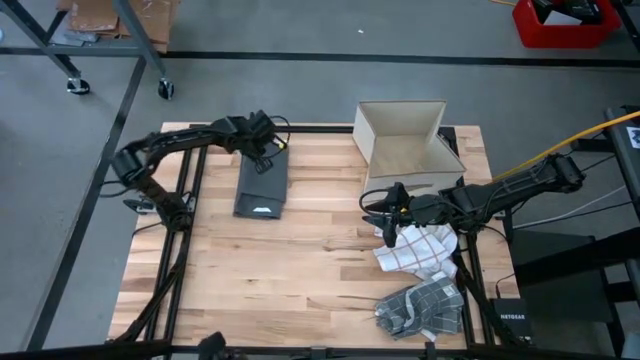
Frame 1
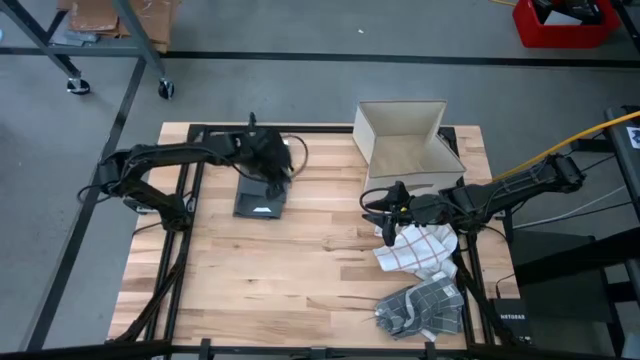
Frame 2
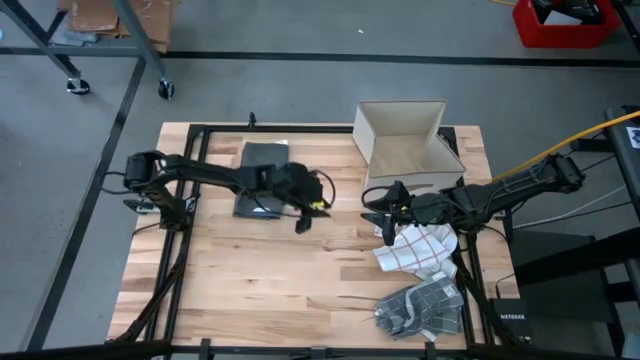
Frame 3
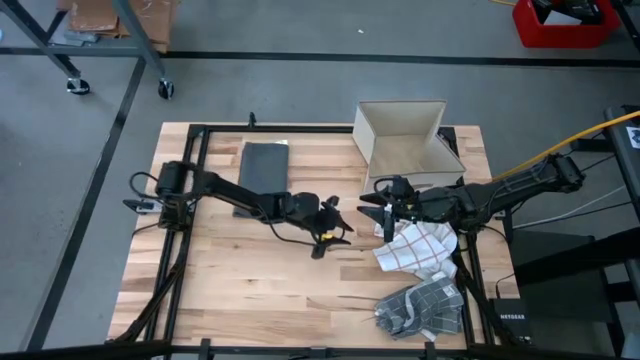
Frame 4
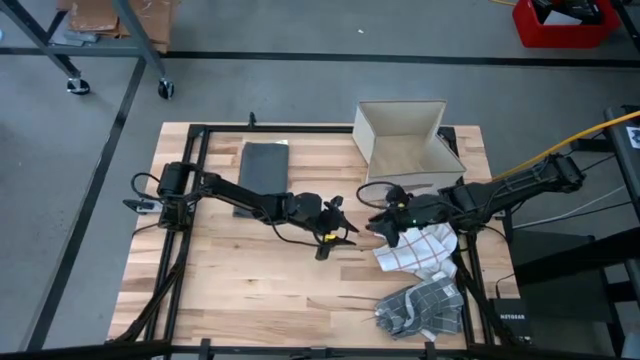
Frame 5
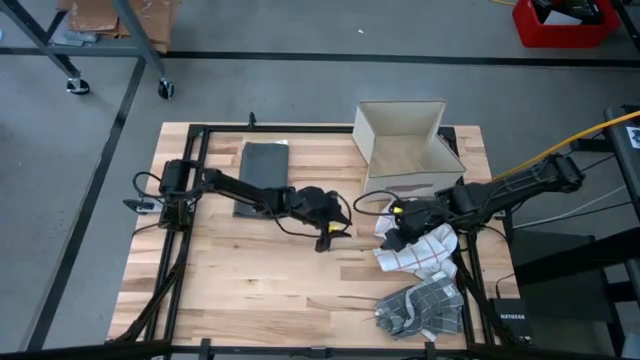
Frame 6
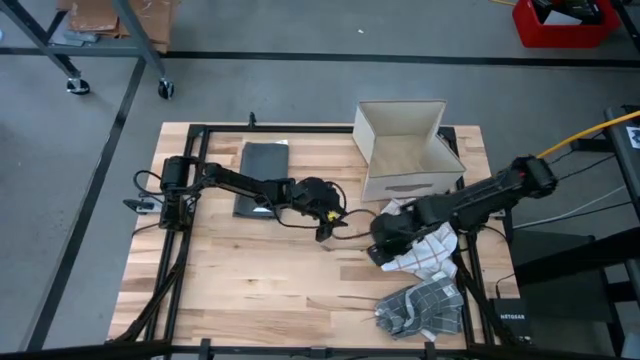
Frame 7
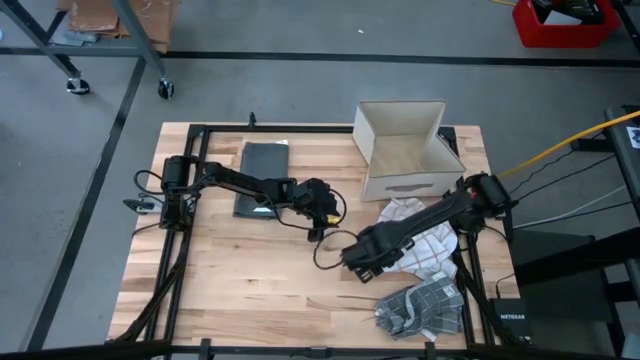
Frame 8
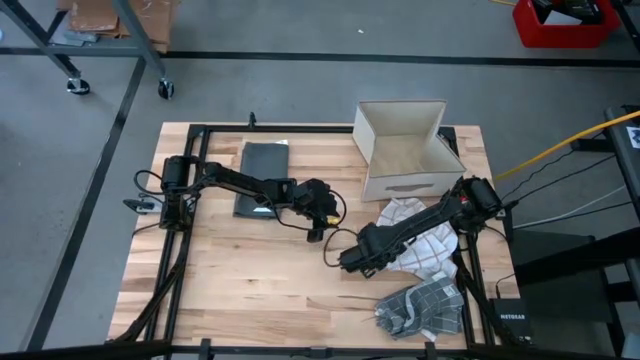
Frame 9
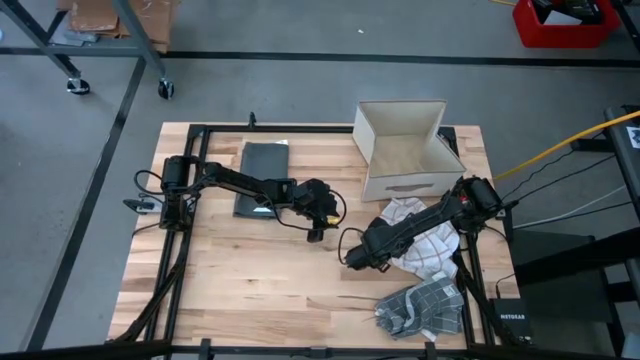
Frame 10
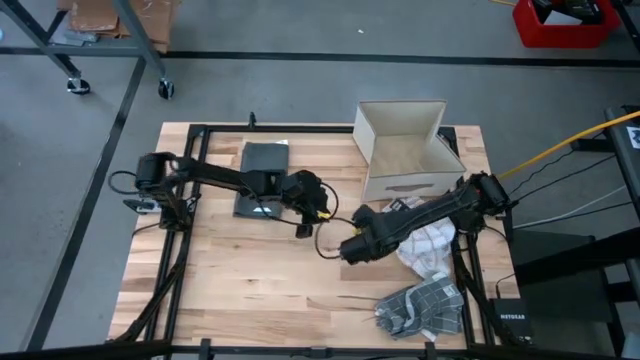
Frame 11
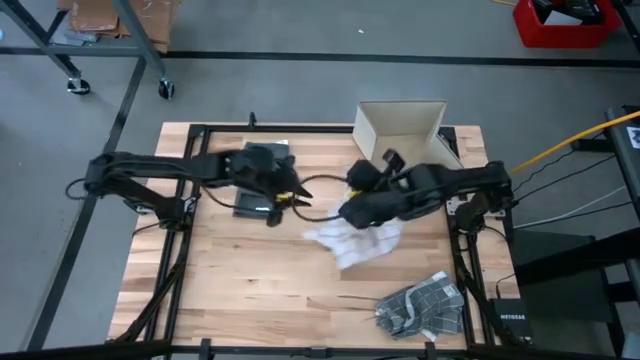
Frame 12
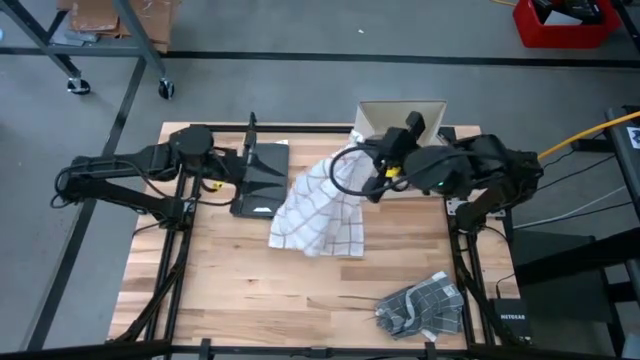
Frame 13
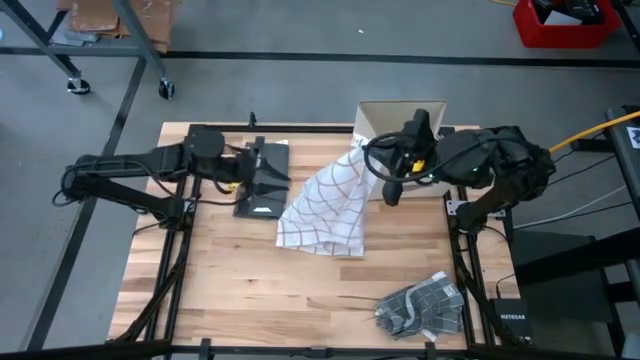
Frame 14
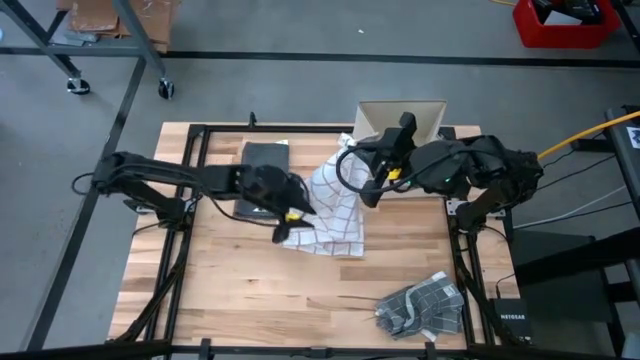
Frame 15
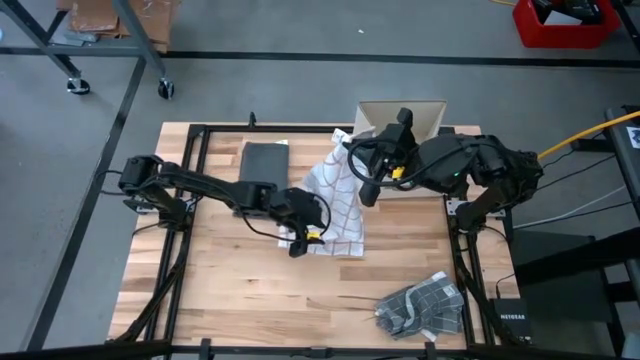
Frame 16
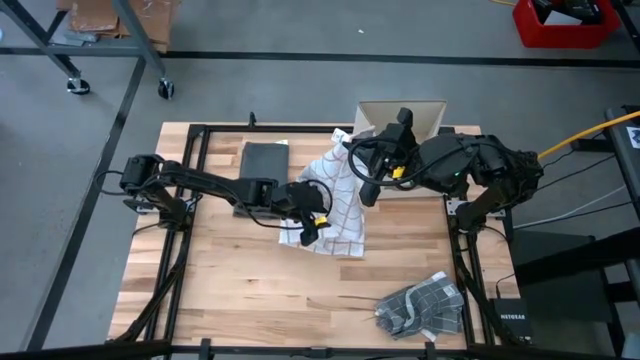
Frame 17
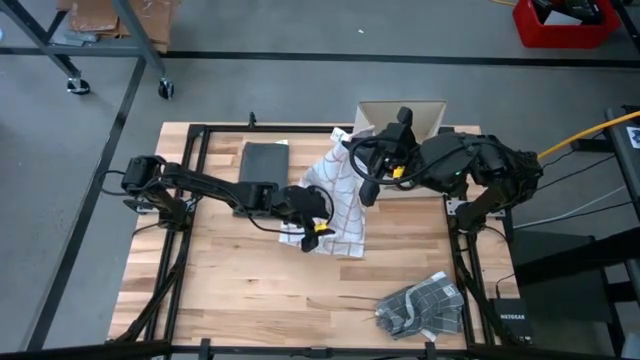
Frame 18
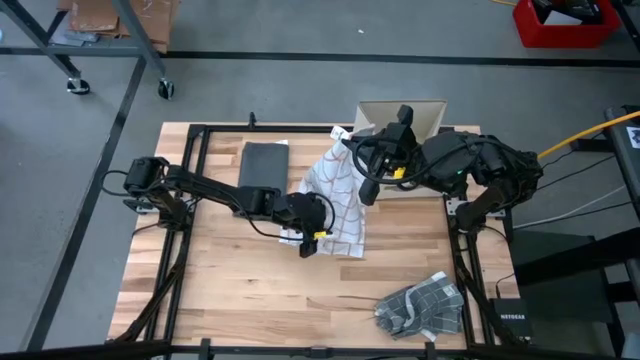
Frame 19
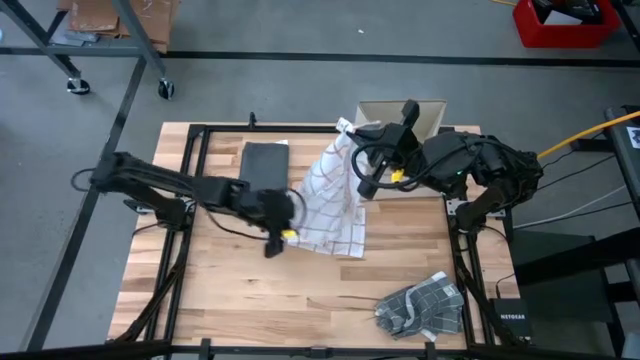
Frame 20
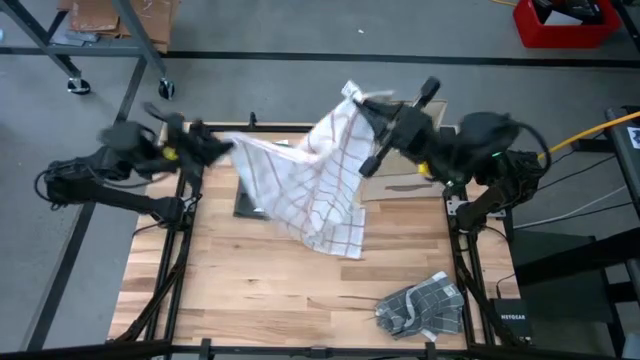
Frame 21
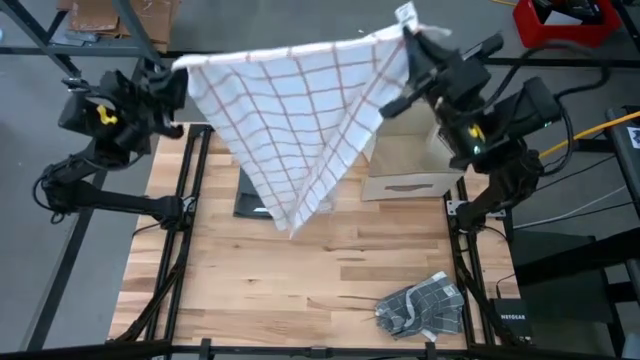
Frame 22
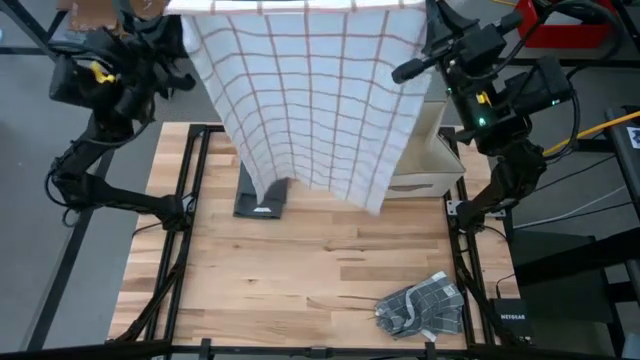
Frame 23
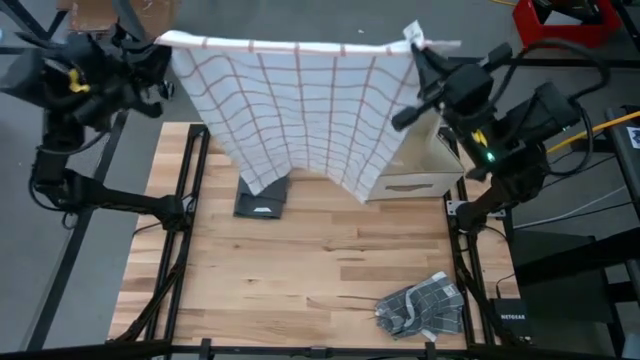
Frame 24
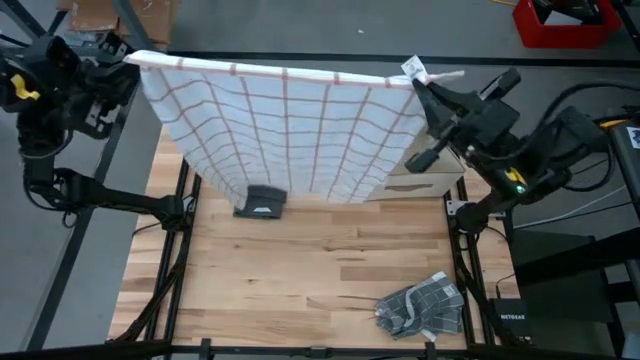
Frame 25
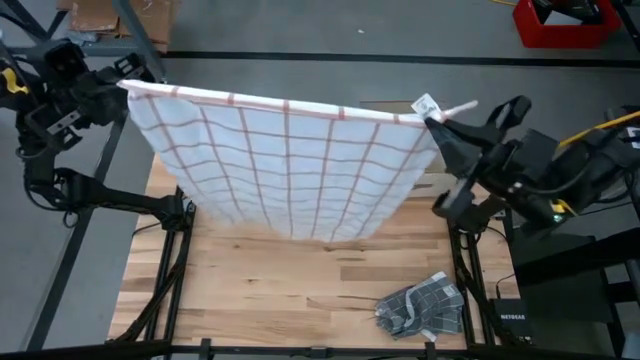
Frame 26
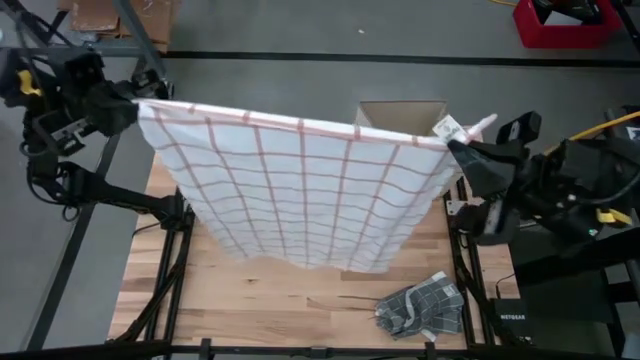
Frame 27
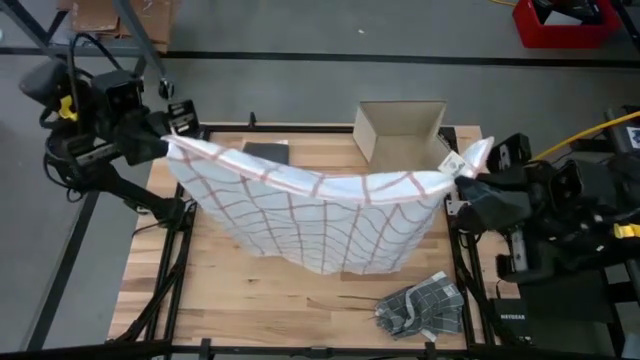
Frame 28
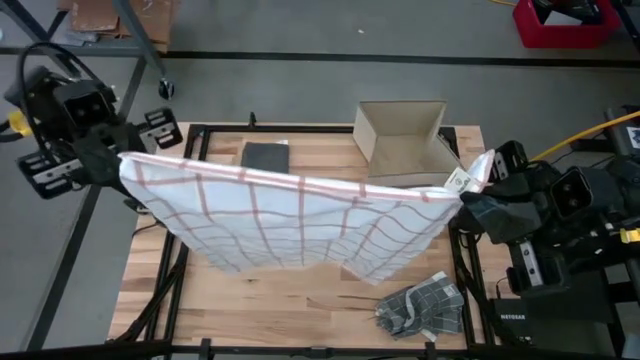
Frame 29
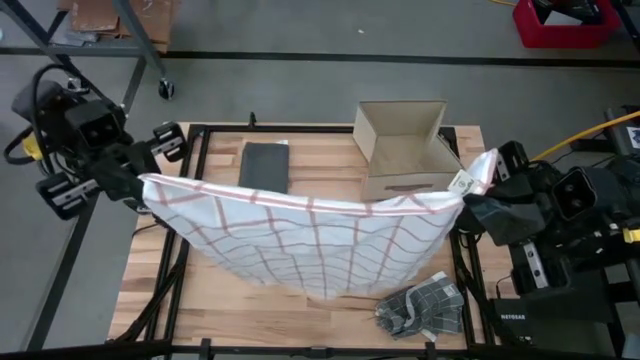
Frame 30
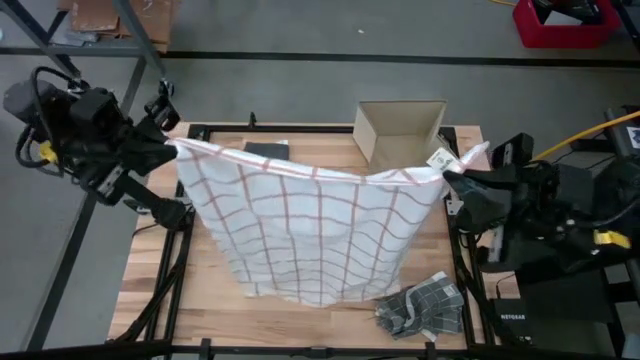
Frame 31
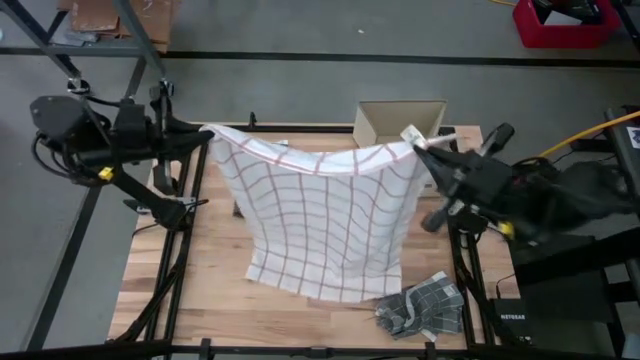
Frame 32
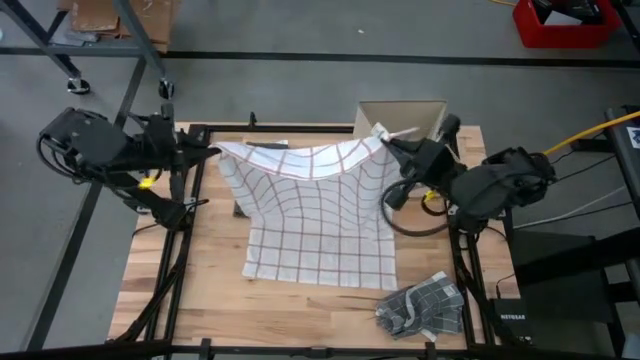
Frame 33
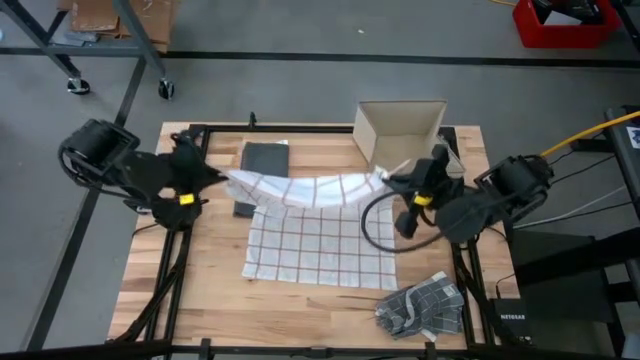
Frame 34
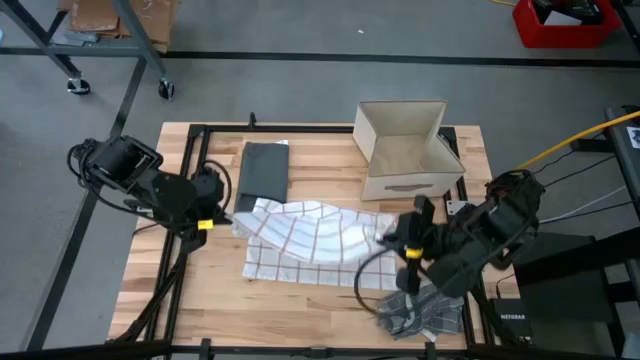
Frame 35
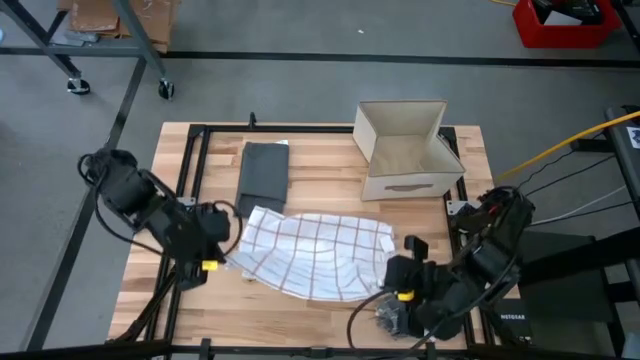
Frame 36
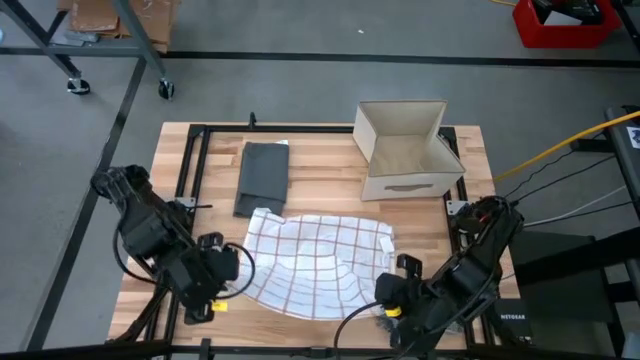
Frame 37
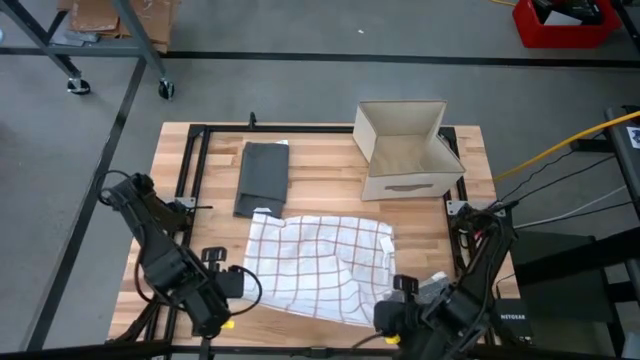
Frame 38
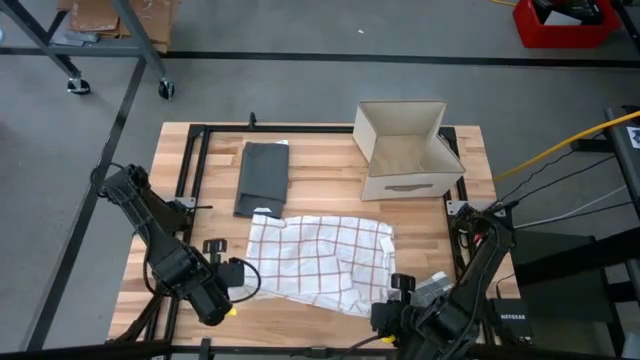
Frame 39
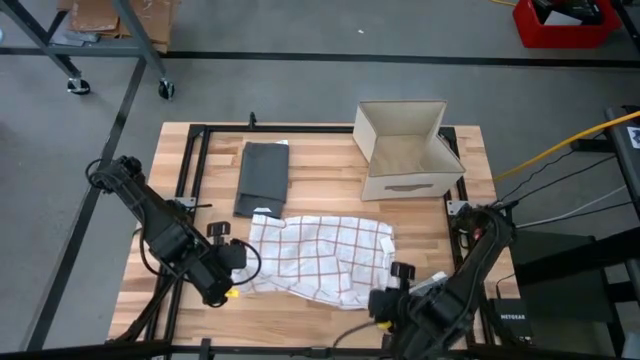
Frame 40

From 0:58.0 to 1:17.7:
Task: Fold towel
Fold the white kitchen towel

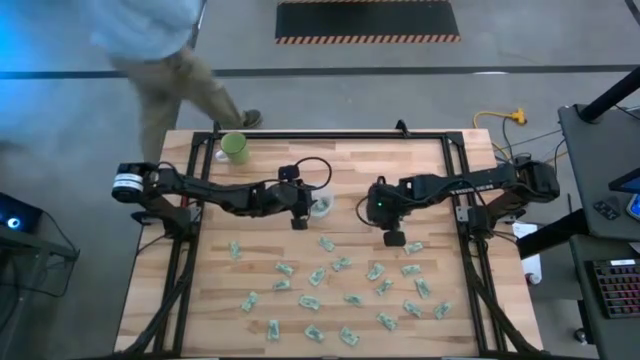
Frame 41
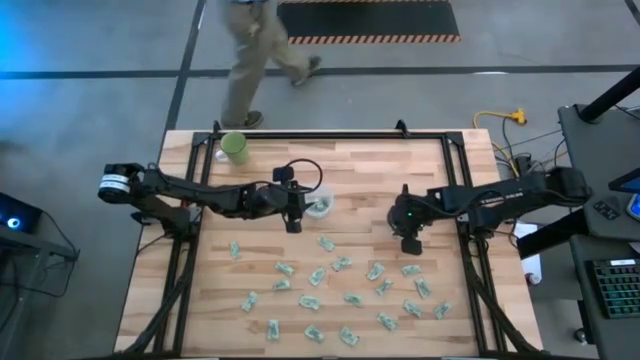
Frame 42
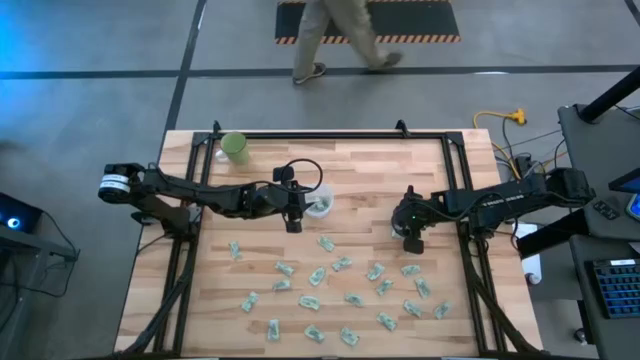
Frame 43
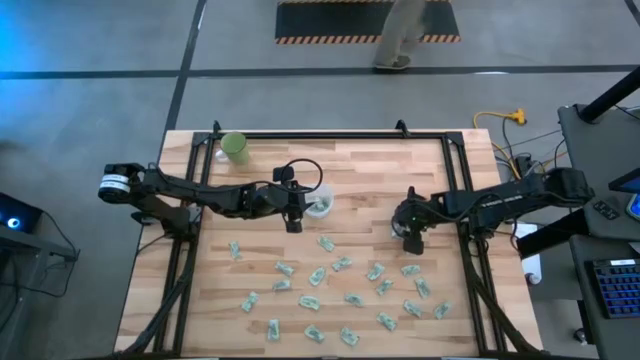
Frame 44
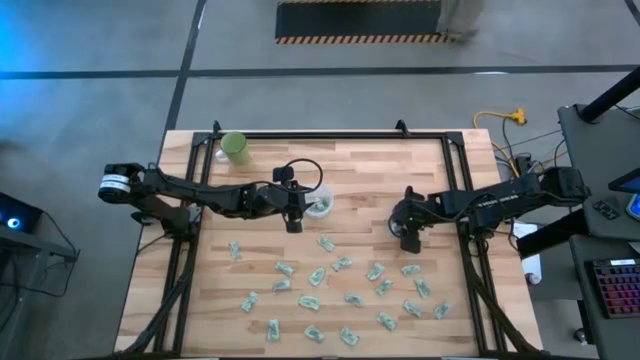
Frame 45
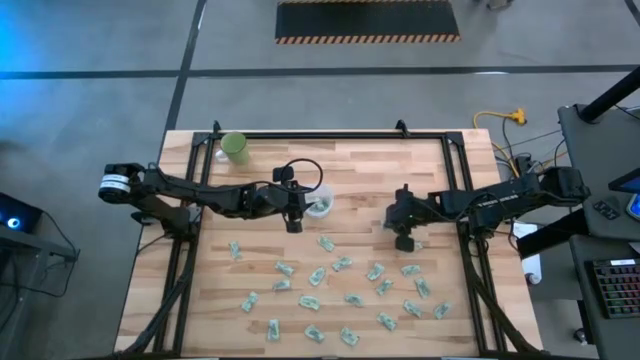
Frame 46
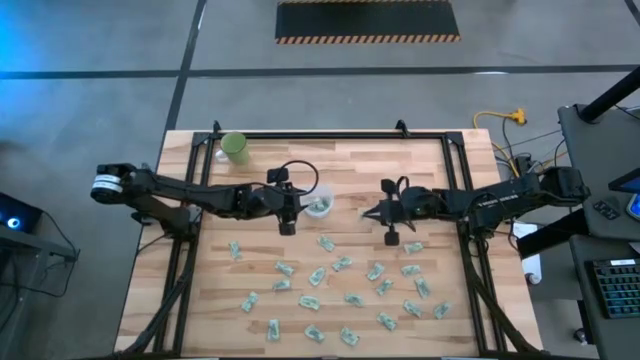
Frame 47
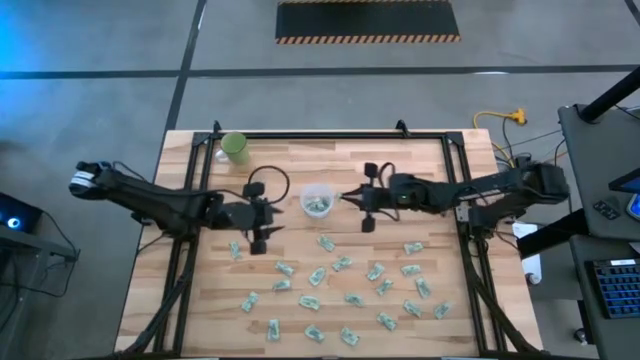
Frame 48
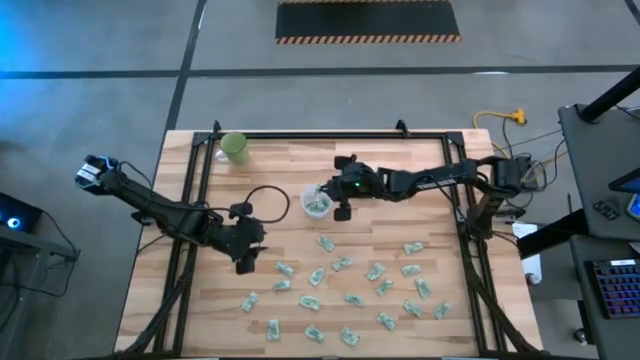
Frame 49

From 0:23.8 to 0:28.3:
Task: Pick and place Stevia / Truvia into bins
Put the green stevia packet into the transparent container
